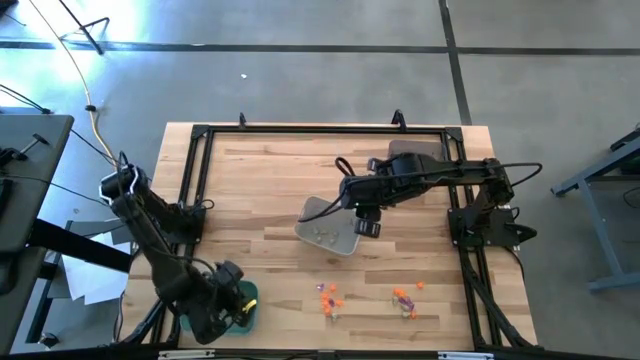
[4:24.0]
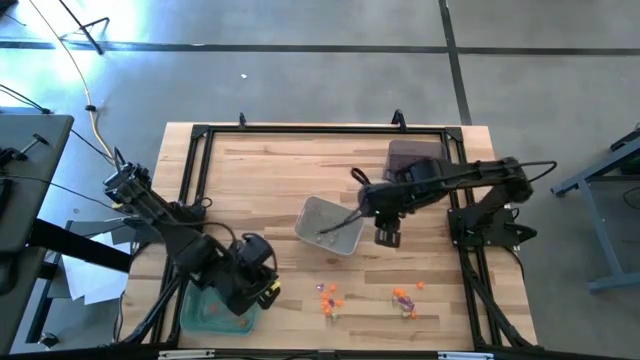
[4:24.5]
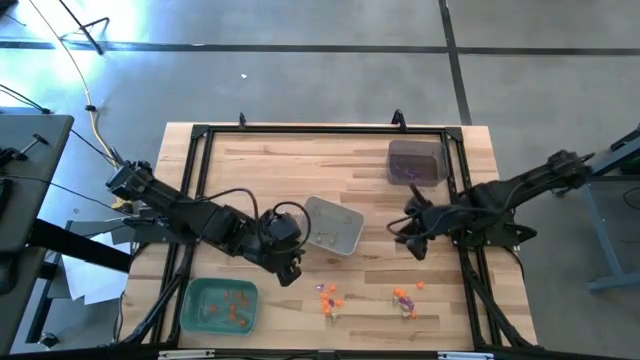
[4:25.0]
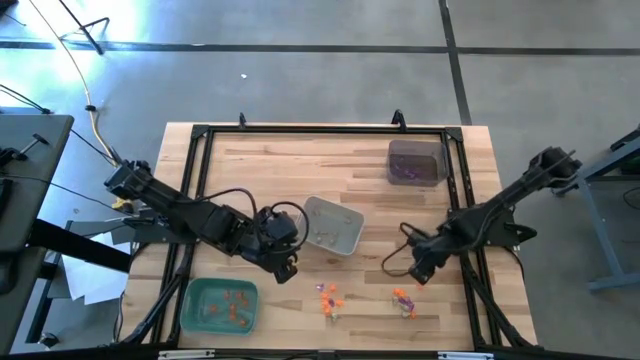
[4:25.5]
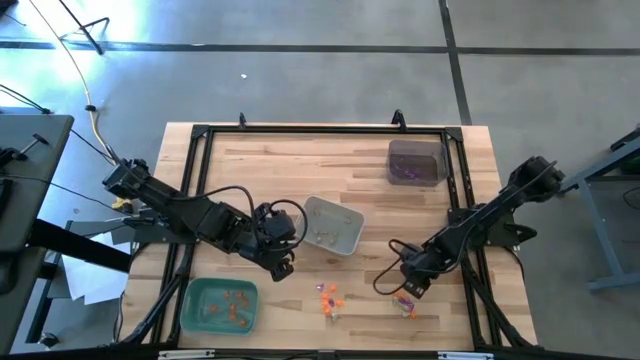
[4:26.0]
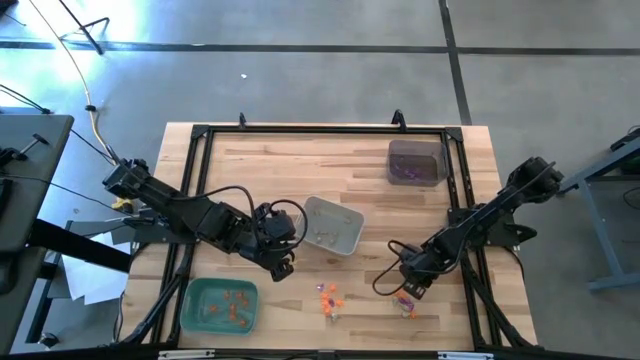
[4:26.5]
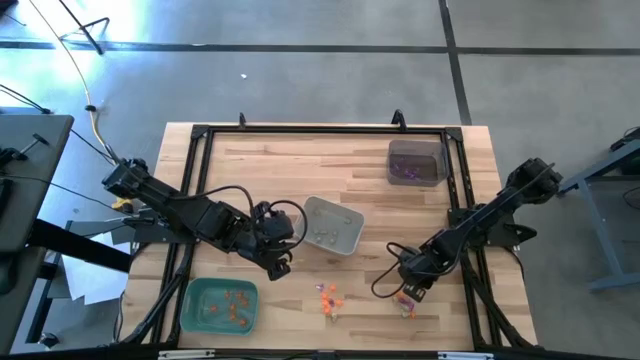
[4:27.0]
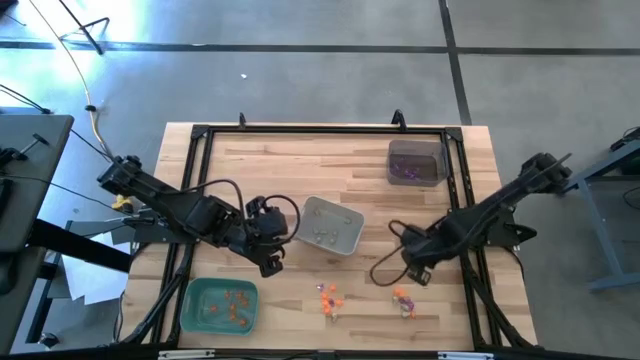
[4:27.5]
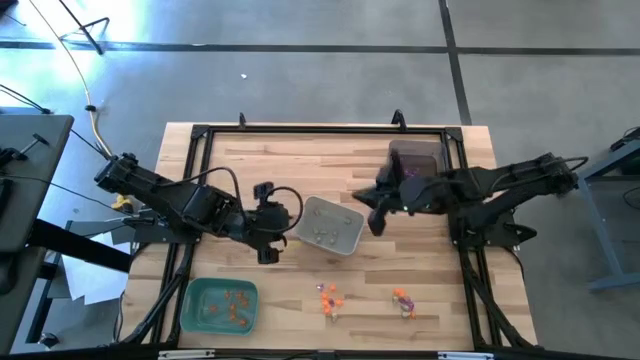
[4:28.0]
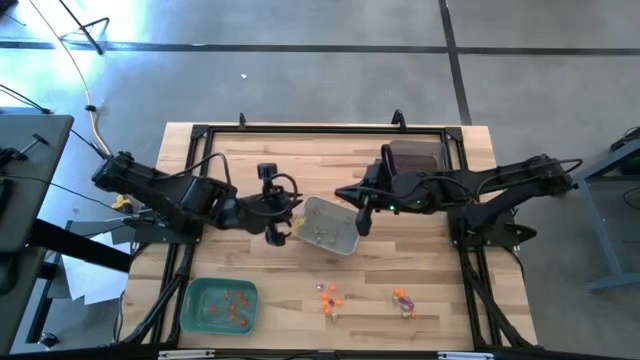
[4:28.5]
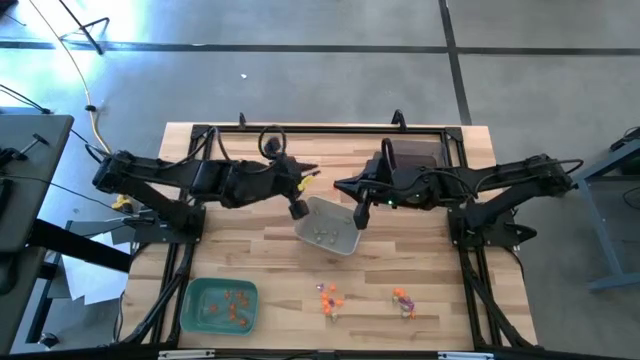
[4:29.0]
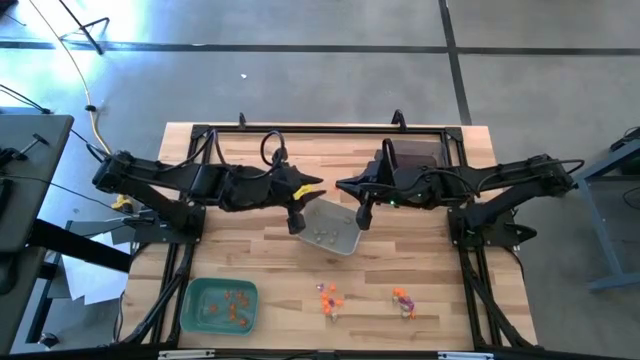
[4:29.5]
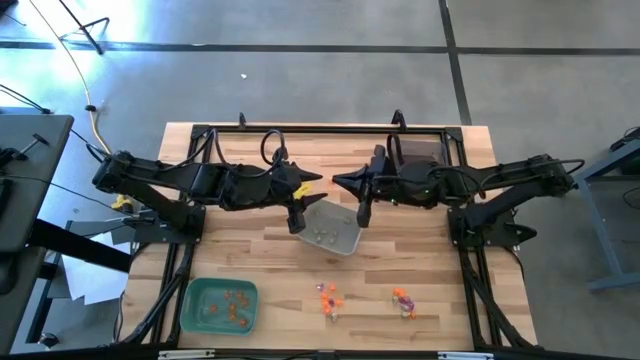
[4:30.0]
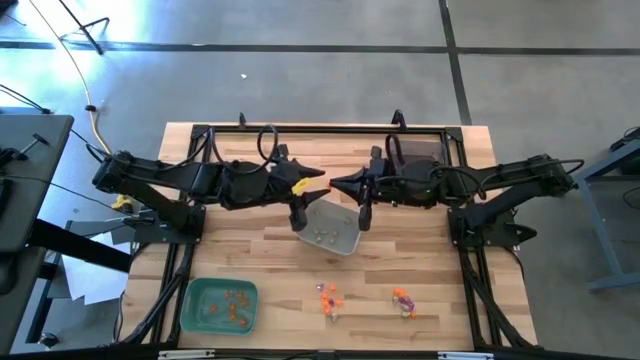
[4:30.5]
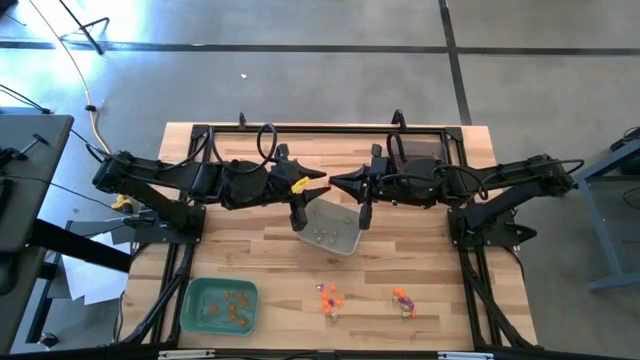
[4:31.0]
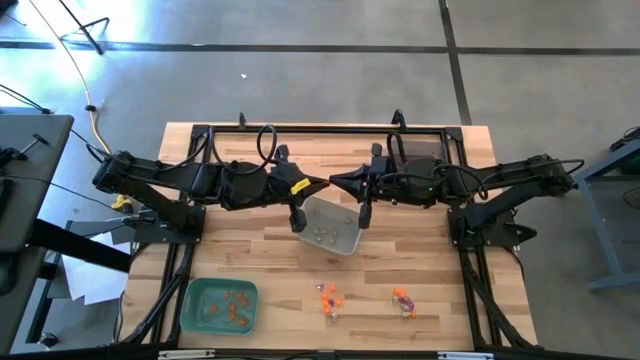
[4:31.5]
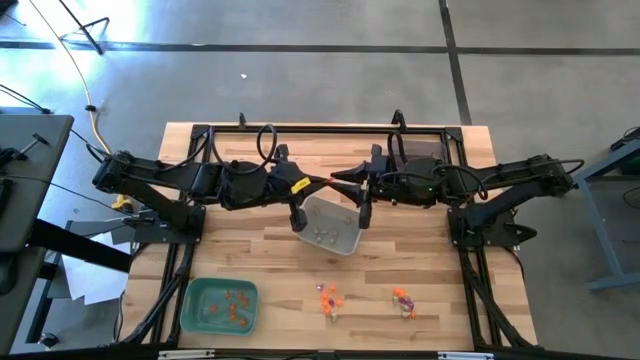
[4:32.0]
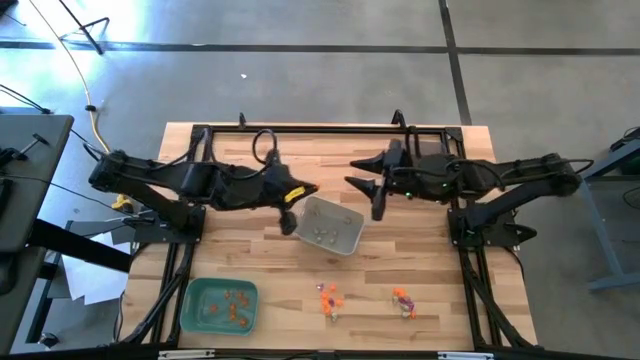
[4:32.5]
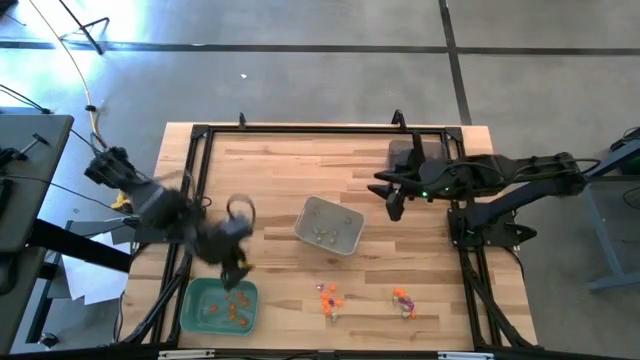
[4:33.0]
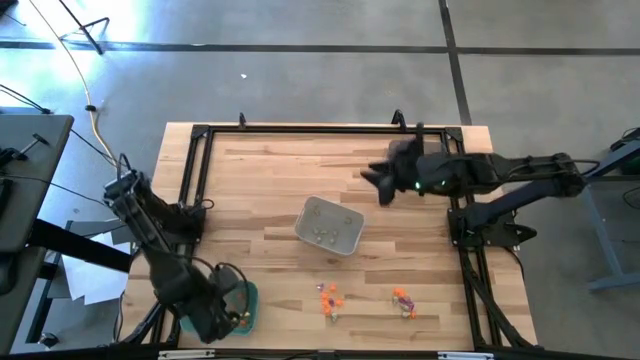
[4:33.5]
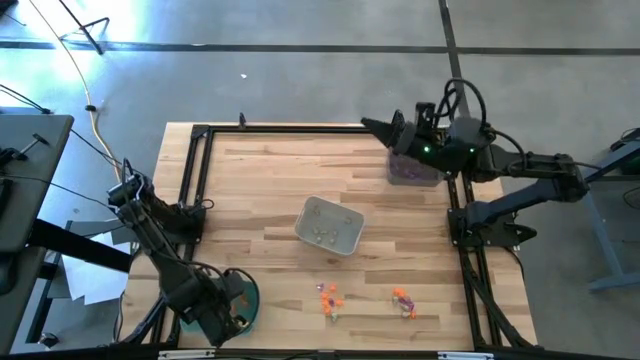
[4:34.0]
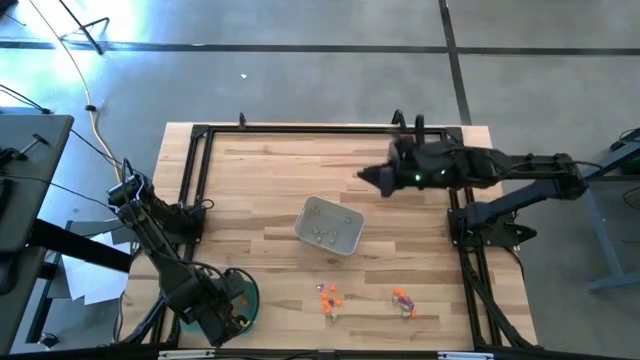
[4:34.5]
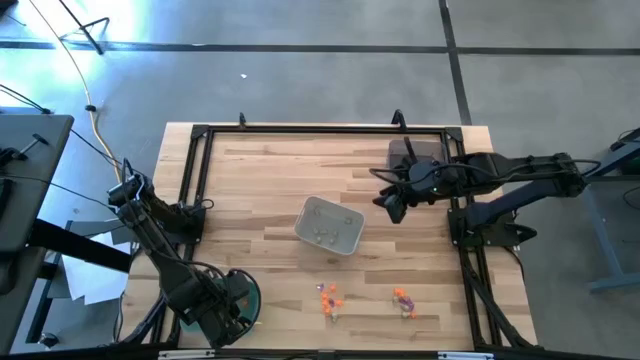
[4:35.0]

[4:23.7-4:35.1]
Task: Sort Halloween decoration
Put the orange spider toy into the green bin

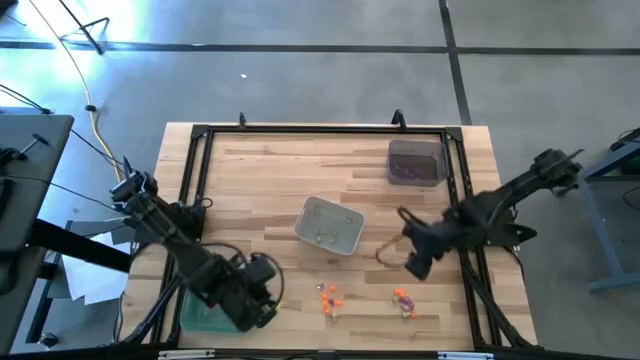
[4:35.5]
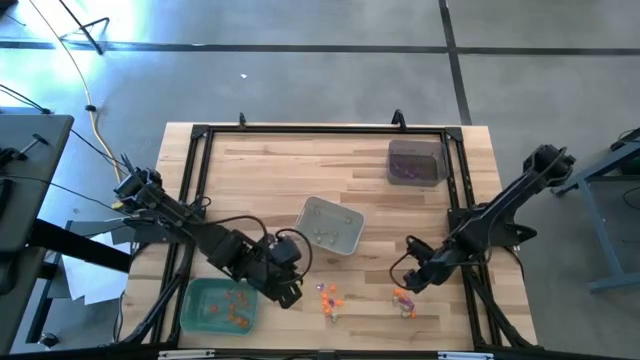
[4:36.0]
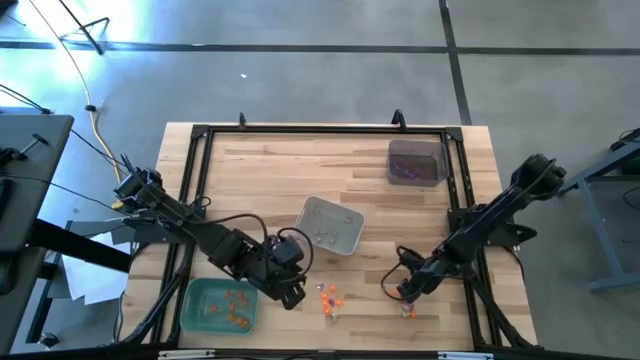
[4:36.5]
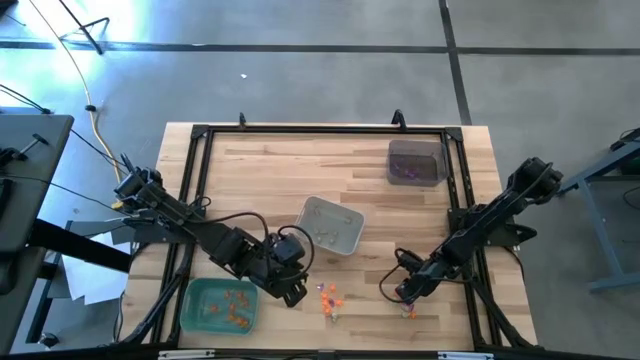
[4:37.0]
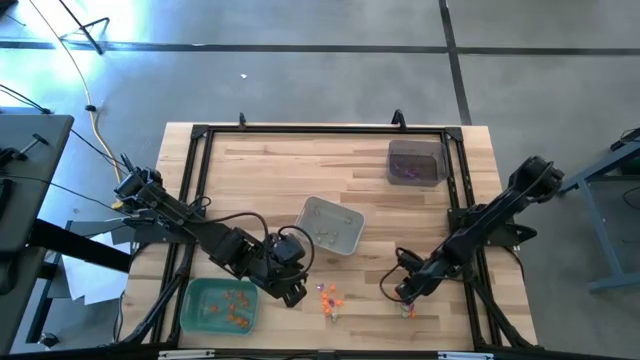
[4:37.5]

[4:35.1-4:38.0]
Put the orange spider toy into the green bin

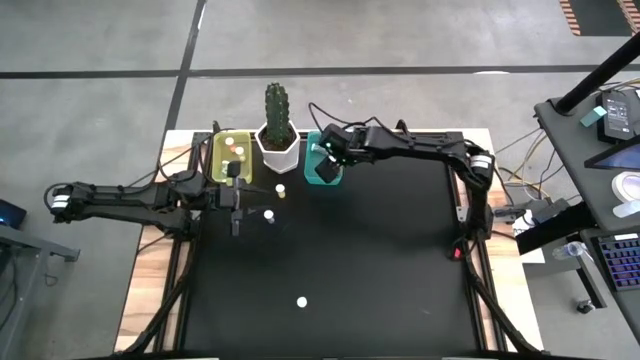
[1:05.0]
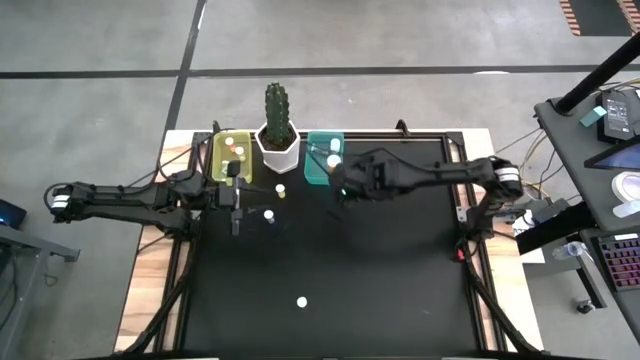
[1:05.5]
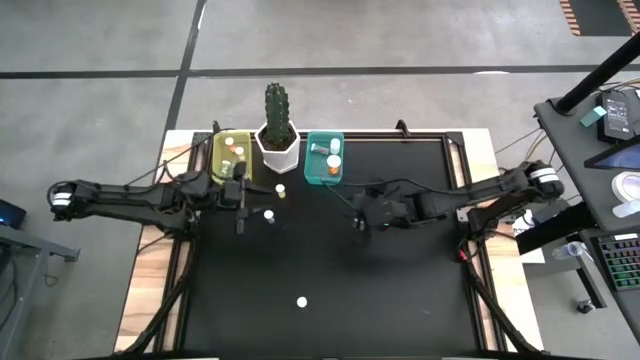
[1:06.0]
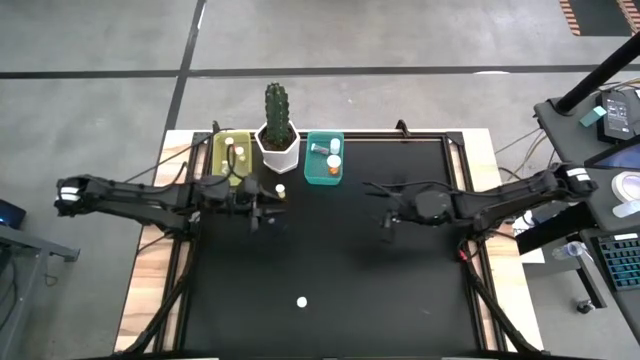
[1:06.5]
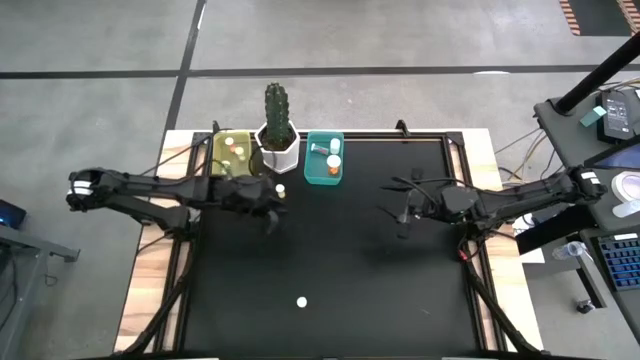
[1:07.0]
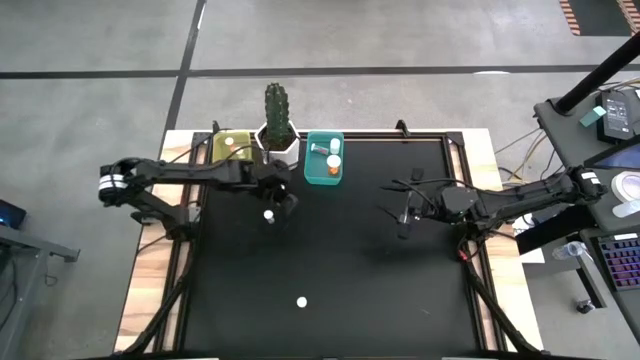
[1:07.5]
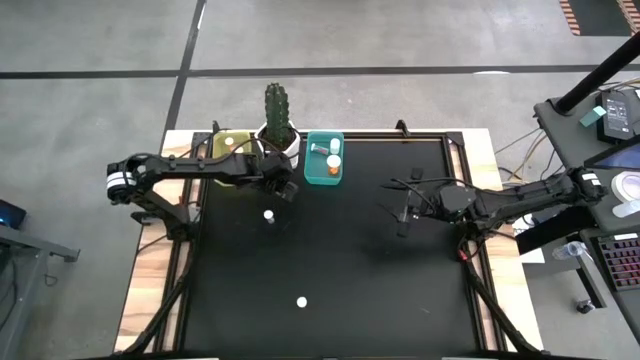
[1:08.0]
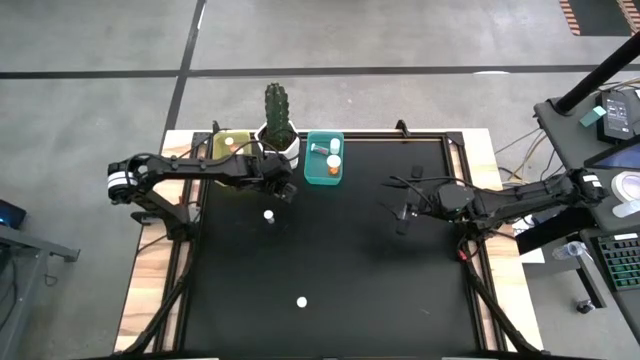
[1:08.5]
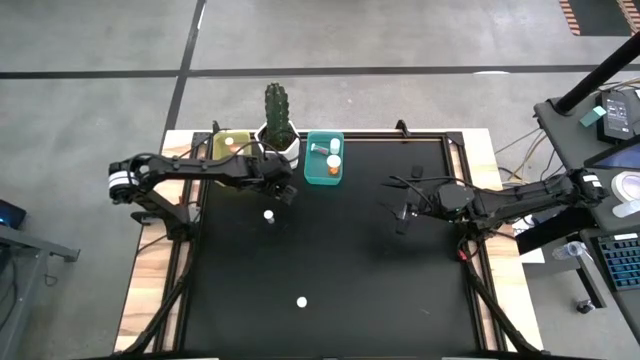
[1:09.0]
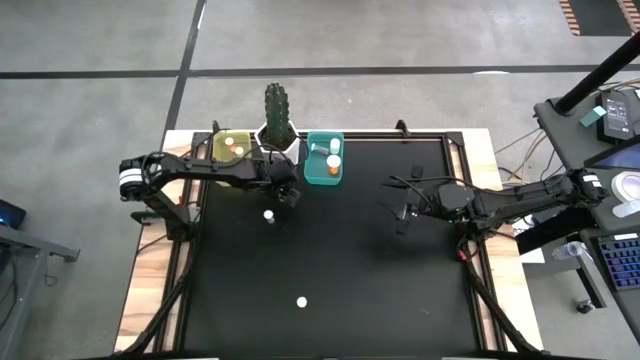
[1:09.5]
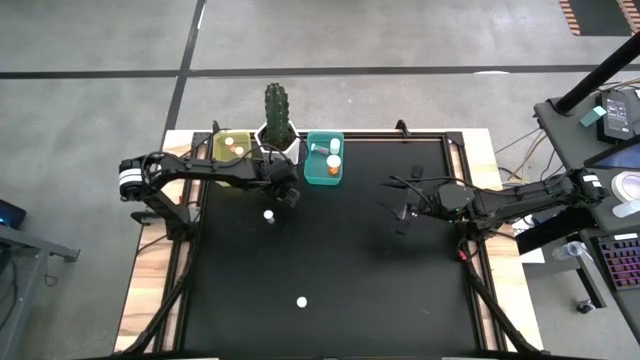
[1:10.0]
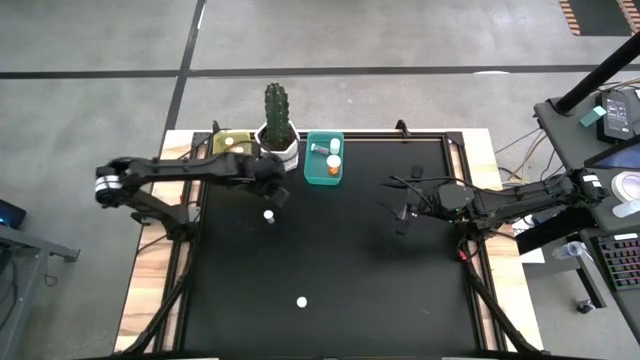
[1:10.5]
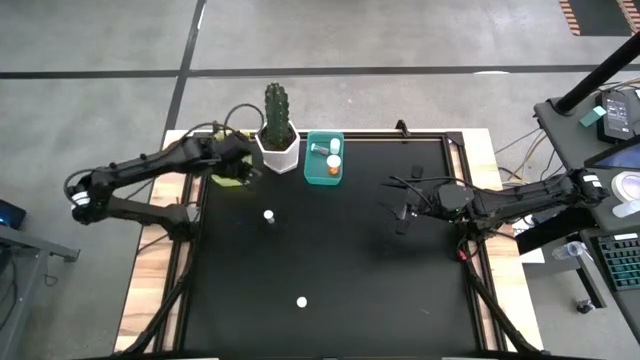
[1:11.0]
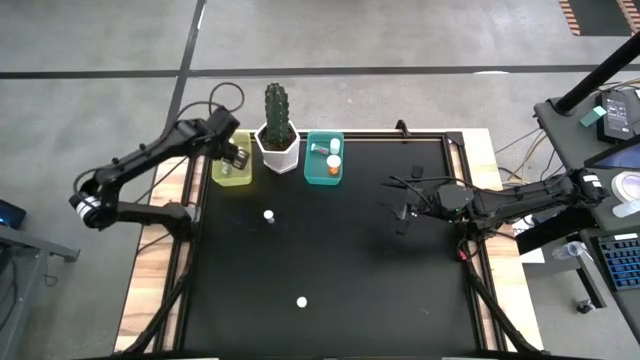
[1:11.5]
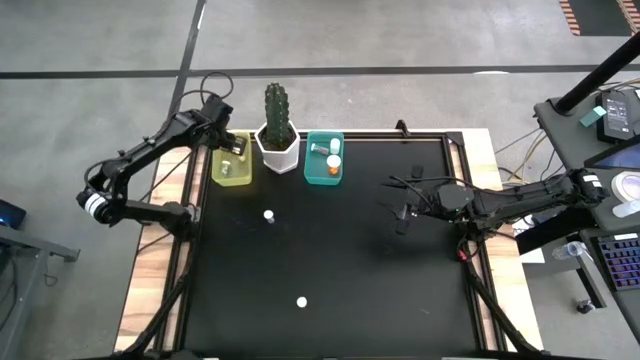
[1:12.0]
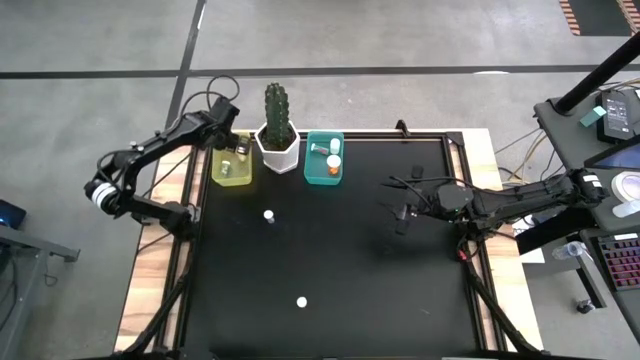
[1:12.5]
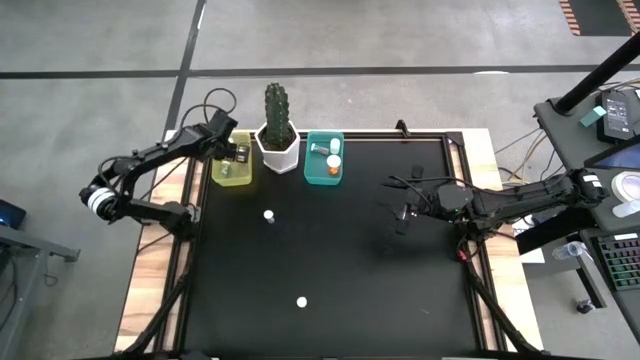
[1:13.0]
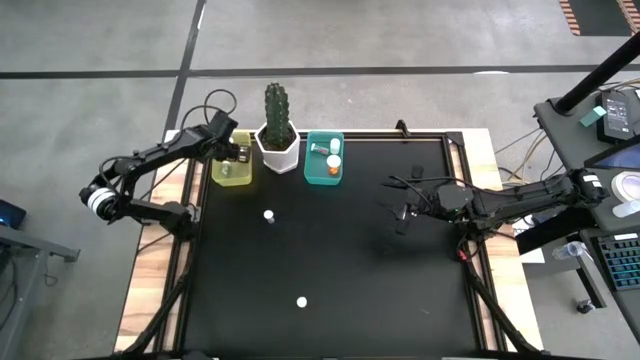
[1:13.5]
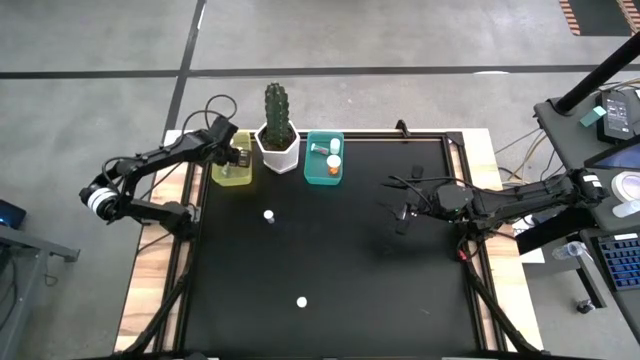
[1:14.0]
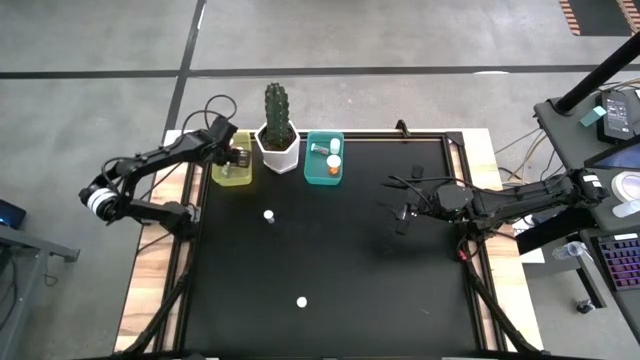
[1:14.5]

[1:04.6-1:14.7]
Task: Pick and place medicine bottles into bin by pill shape (circle, oval)
Put the yellow tablet bottle into the yellow bin
